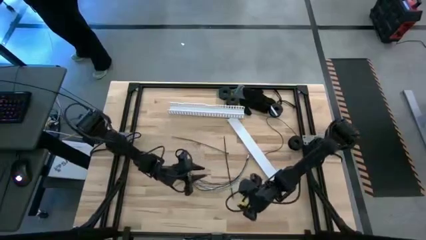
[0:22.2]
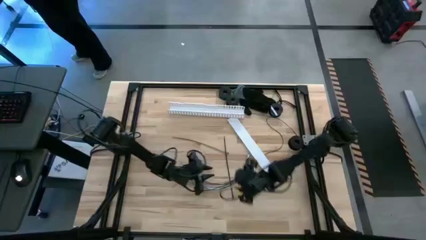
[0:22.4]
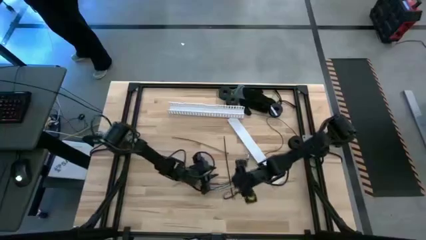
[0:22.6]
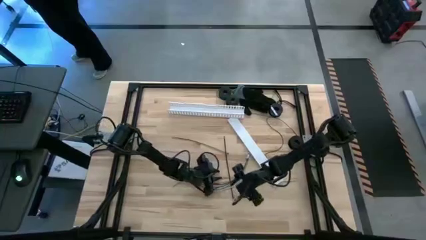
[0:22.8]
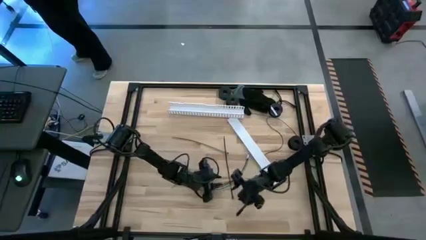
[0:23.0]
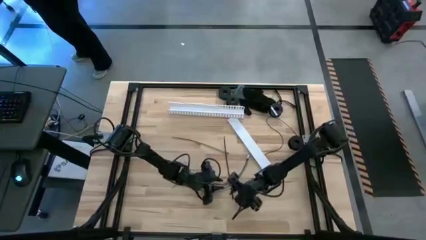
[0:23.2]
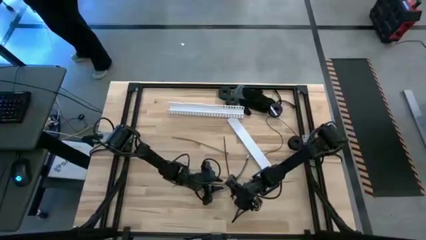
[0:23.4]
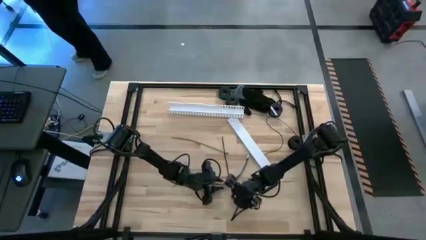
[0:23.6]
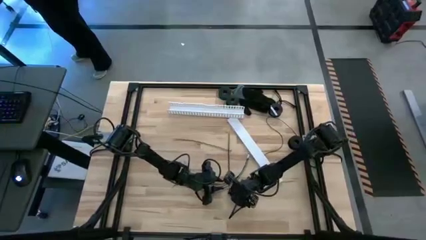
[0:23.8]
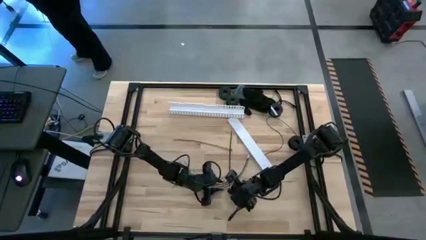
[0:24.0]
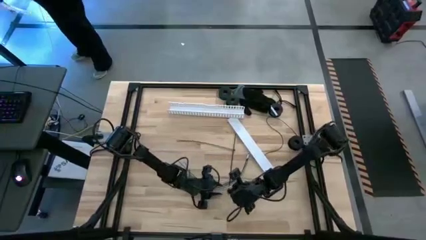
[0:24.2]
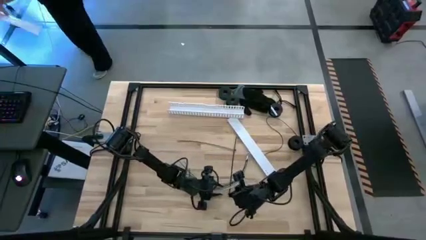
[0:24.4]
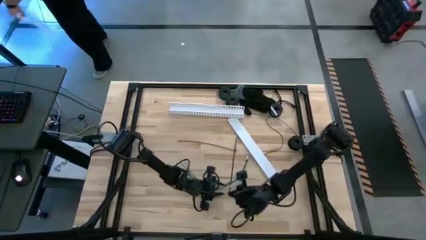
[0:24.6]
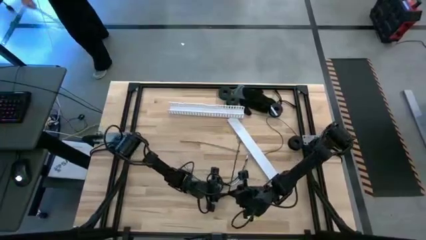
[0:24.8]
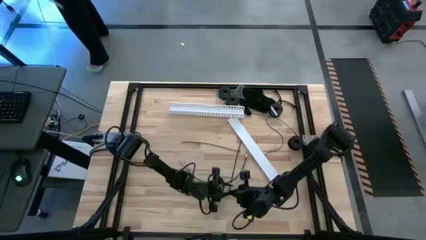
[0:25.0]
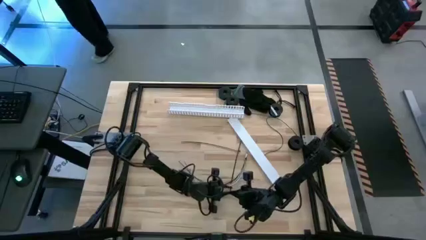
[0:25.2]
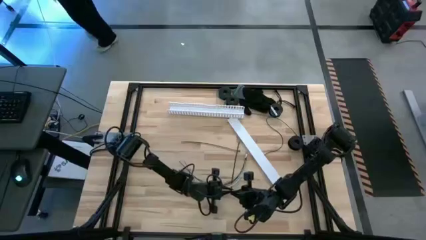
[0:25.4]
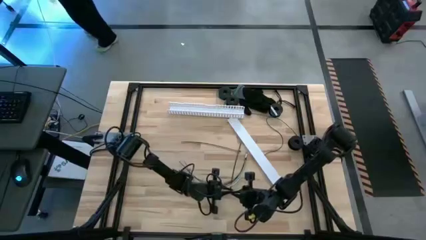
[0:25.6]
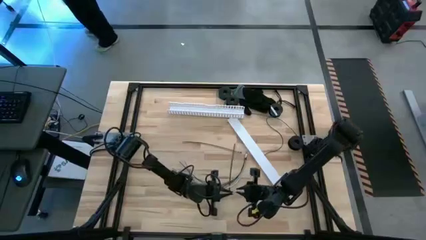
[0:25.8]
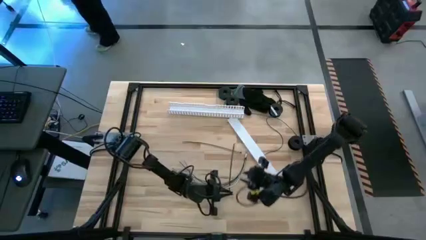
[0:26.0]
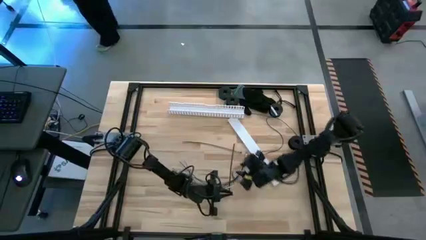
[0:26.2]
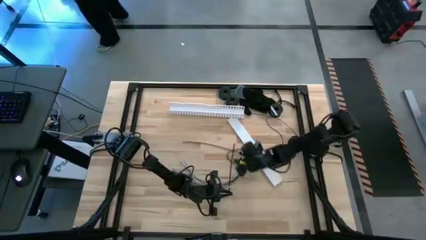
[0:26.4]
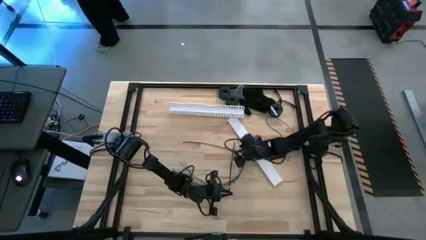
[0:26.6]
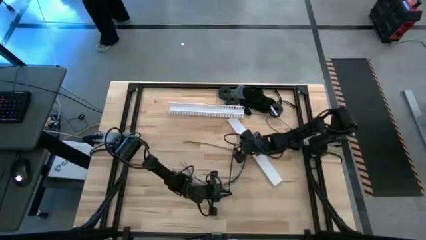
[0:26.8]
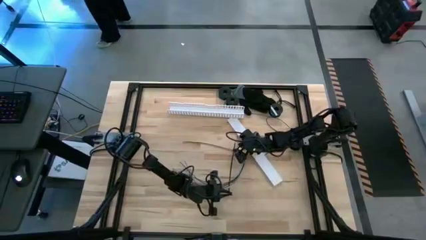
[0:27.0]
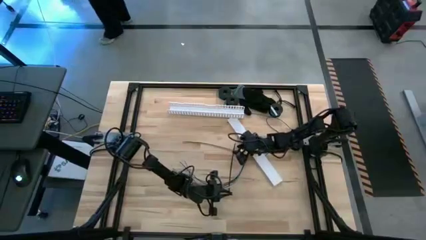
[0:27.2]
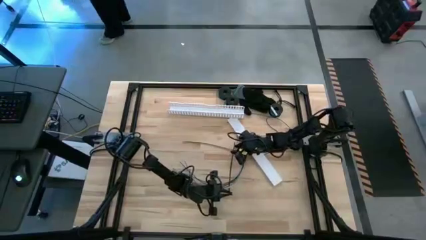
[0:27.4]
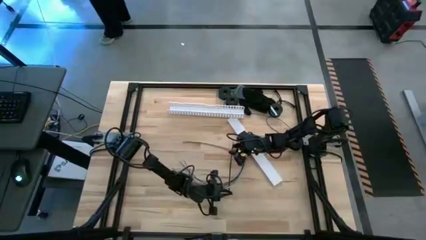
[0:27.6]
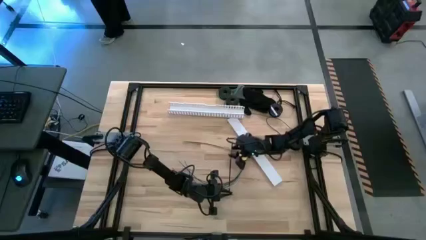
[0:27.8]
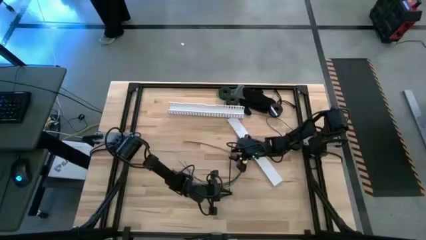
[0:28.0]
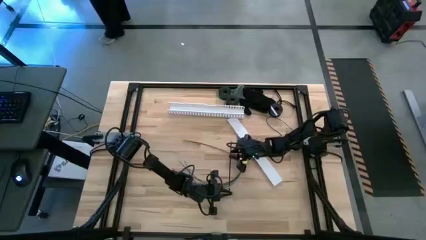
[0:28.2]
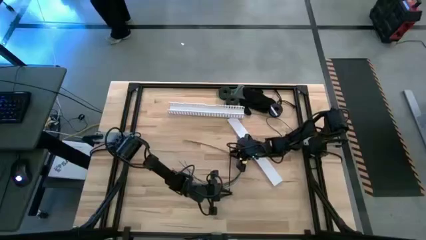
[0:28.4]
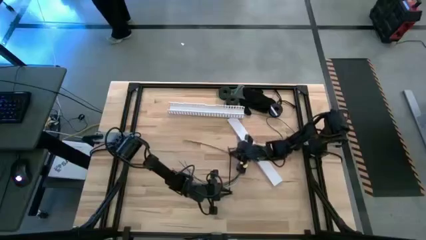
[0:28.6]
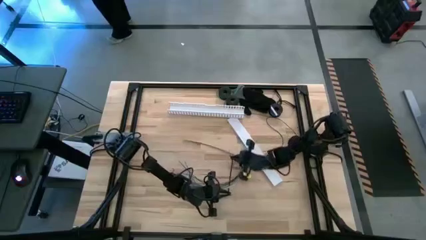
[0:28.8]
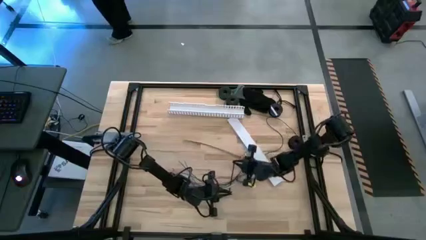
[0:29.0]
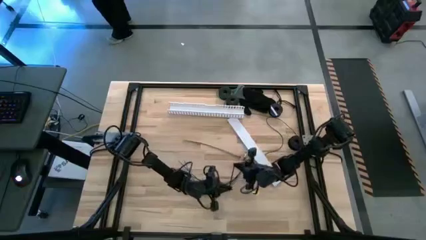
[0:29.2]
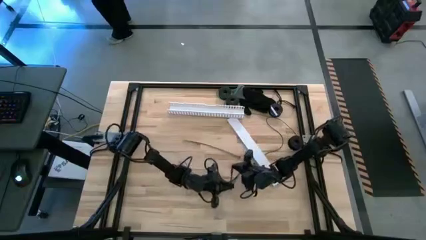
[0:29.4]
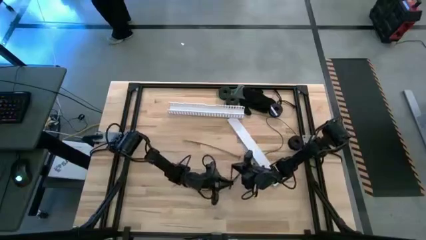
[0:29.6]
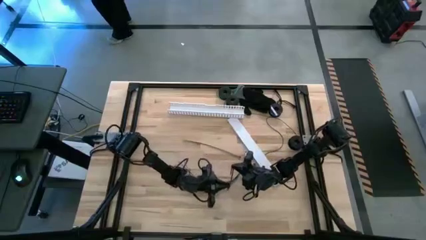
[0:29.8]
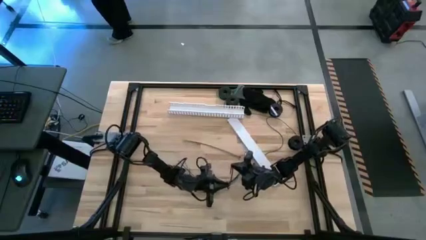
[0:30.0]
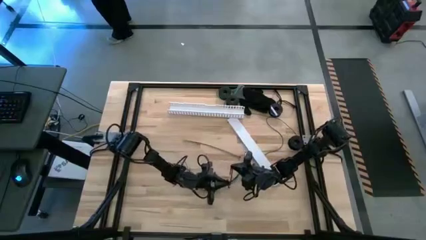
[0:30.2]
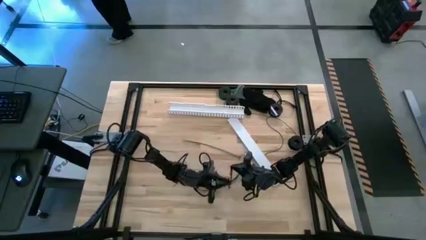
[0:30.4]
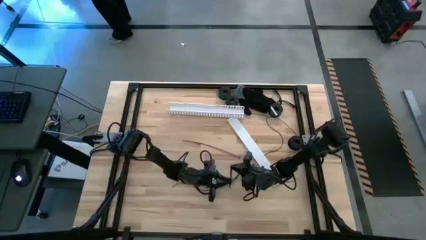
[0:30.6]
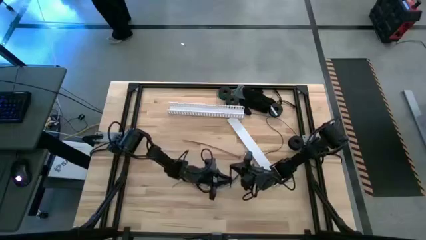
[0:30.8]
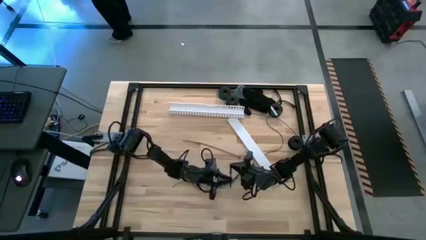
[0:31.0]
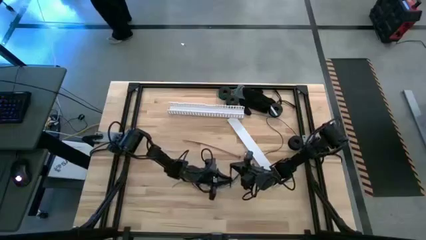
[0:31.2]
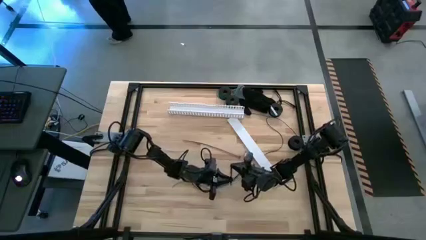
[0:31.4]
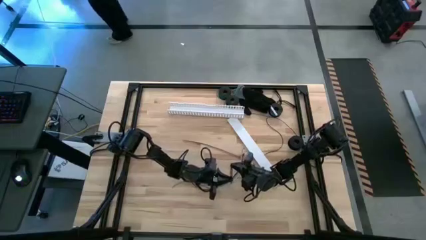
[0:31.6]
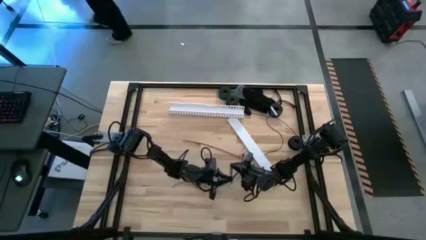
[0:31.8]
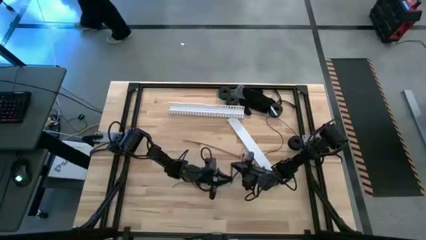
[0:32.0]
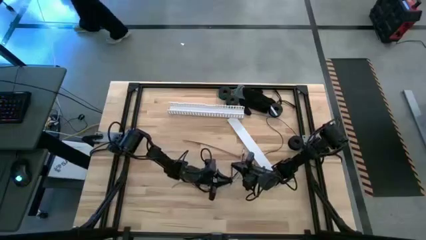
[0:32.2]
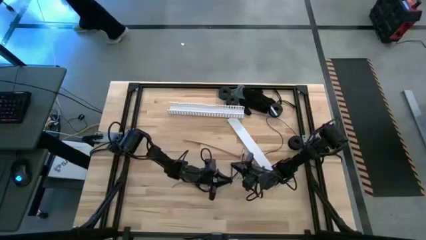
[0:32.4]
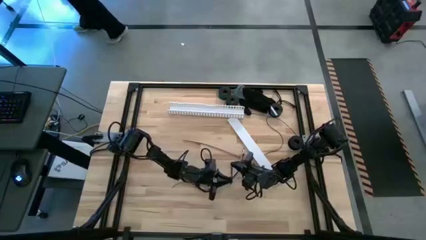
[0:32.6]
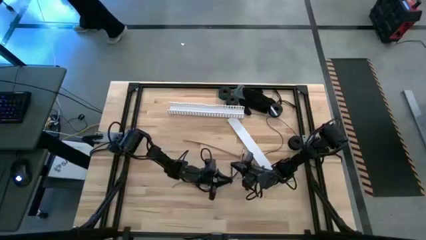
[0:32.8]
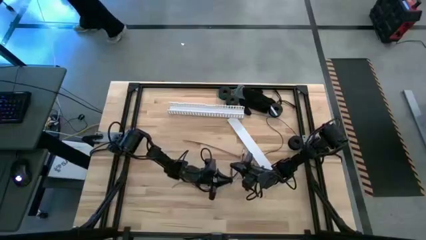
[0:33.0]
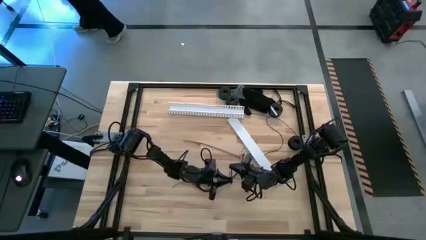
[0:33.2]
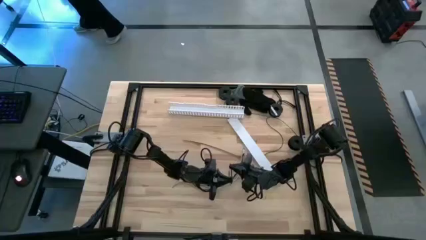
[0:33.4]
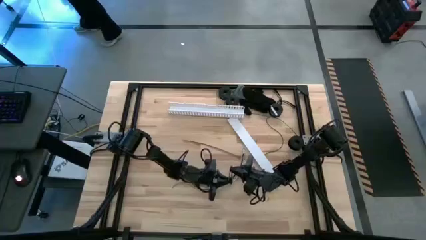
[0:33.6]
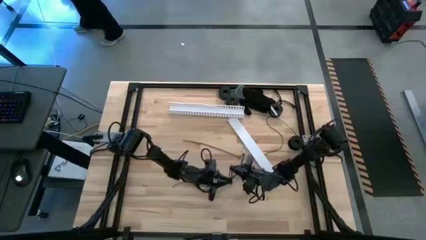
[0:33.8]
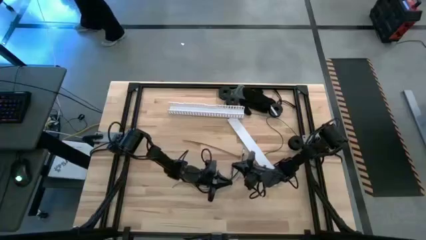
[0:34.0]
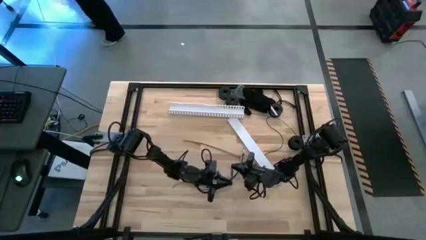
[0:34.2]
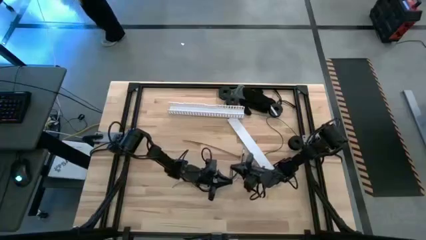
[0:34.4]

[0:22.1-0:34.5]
Task: Ziptie cables
Wrap the wire cables with the black zip tie

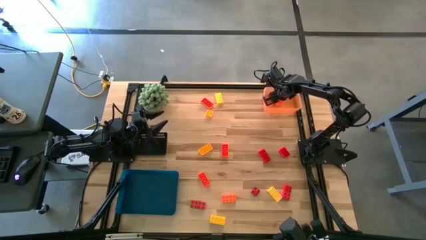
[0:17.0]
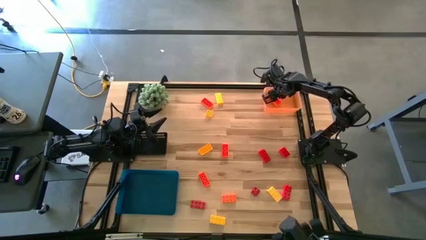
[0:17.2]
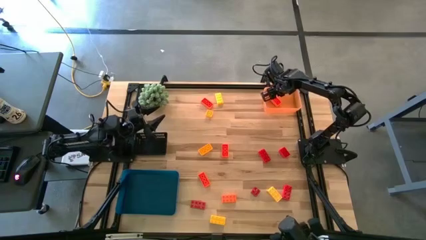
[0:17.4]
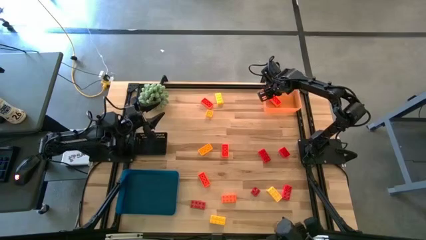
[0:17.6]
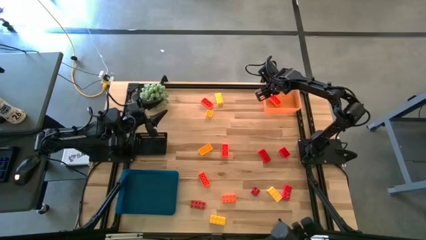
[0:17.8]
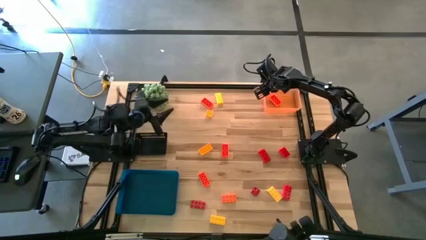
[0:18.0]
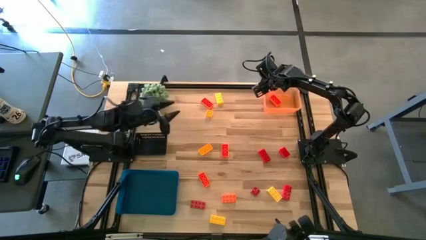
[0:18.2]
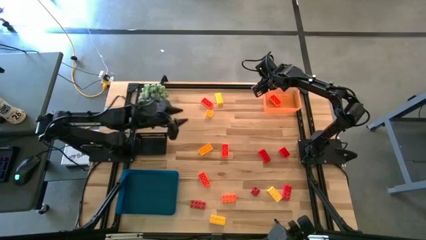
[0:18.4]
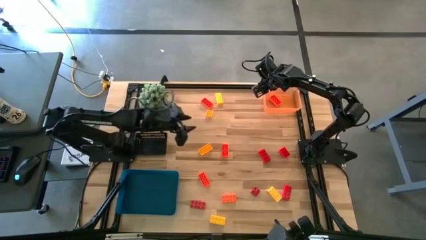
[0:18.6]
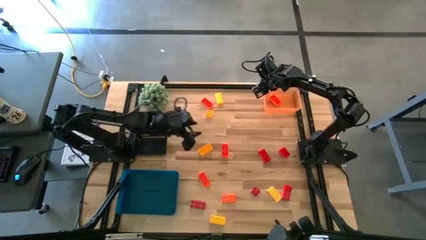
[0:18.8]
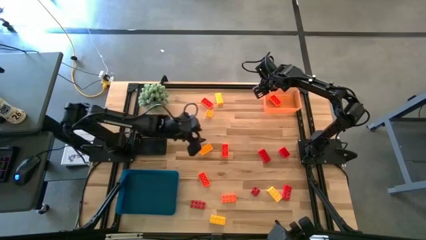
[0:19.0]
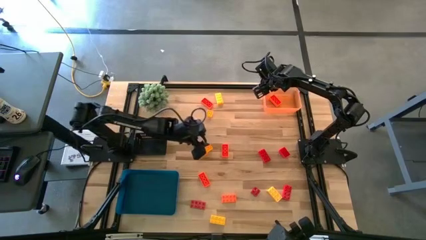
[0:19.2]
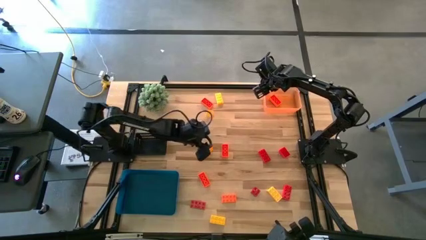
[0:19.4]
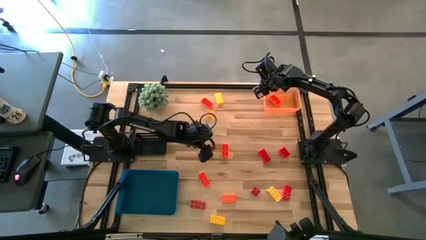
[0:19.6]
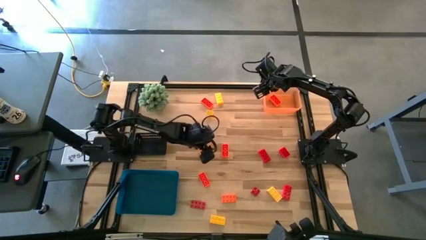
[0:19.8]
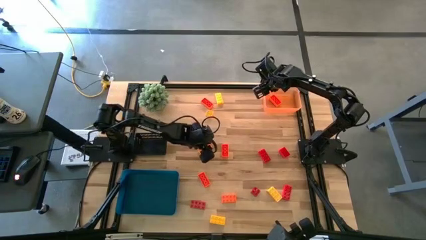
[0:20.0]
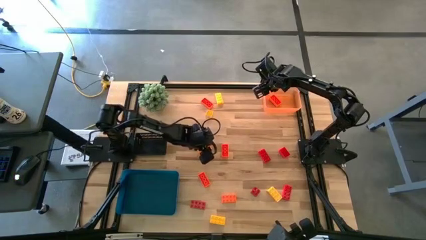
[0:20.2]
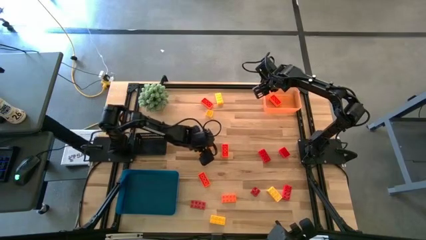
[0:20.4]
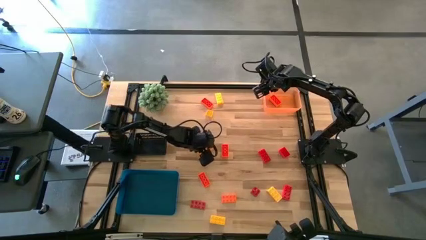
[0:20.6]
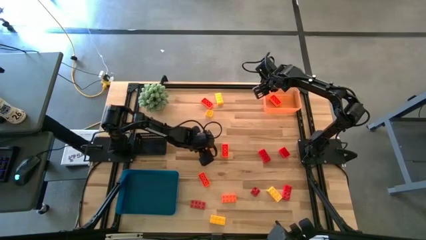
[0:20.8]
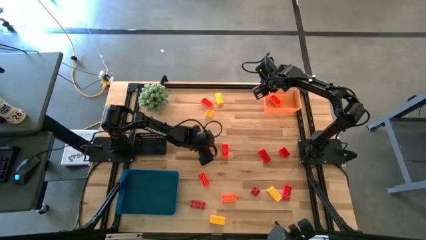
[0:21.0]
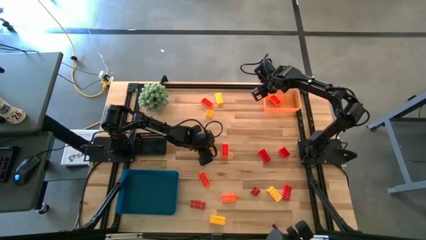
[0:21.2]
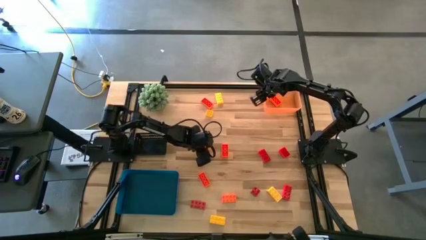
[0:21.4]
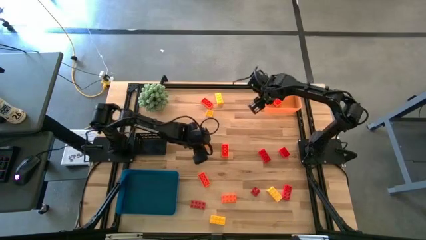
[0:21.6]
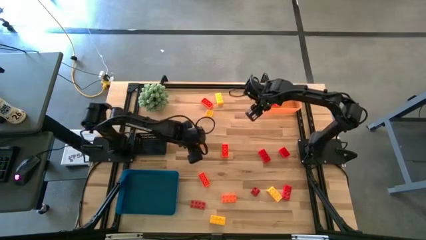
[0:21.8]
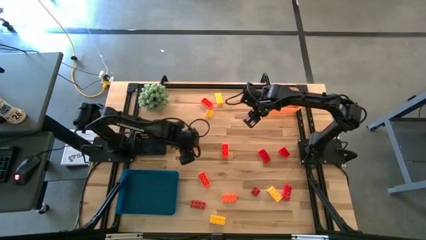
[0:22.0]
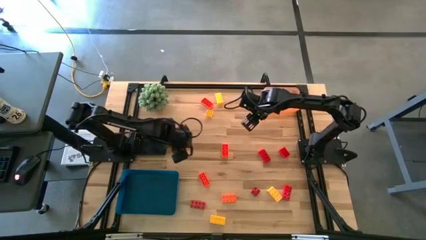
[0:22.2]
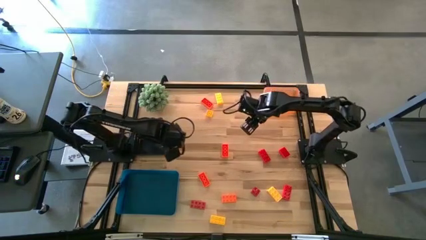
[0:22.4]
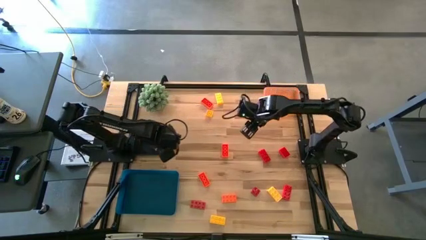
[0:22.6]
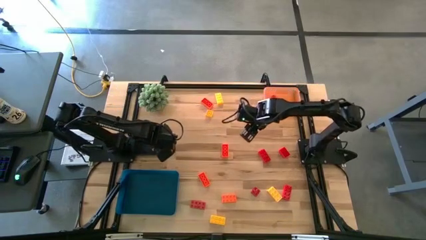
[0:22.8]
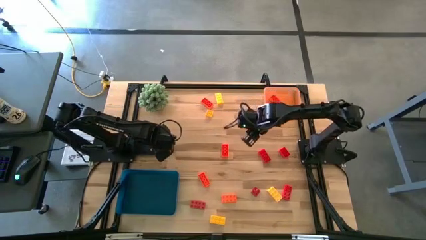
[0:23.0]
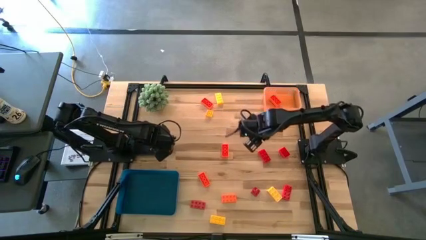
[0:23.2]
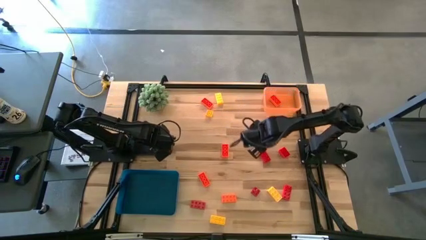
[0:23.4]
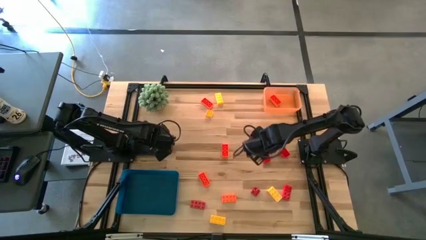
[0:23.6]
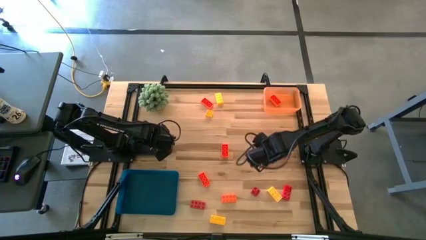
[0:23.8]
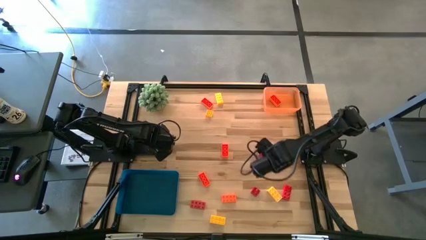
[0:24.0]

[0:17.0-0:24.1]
Task: Sort & place blocks by color
Put the yellow game piece into the black bin
